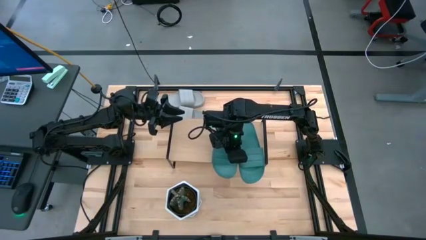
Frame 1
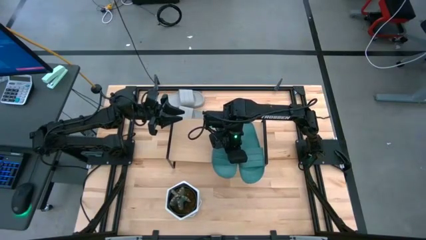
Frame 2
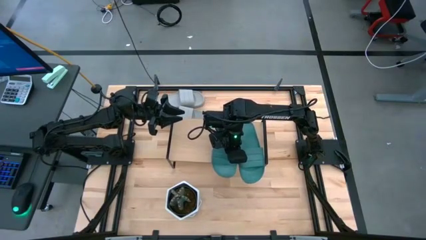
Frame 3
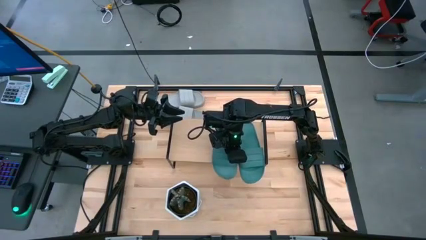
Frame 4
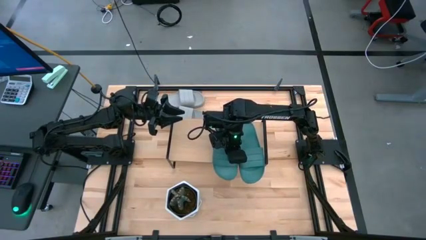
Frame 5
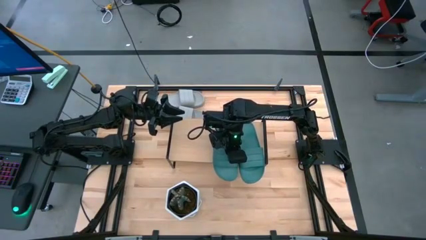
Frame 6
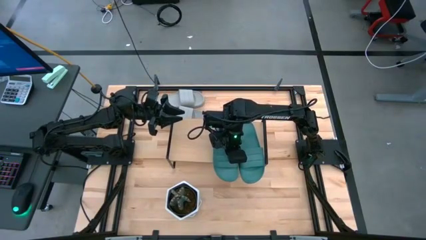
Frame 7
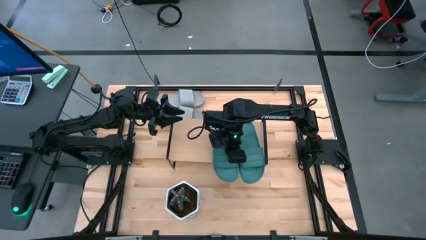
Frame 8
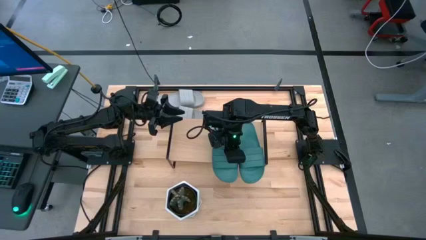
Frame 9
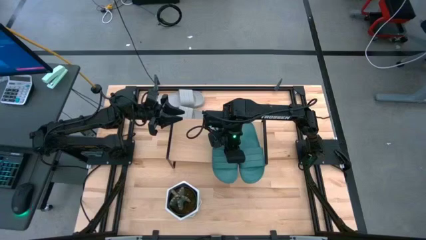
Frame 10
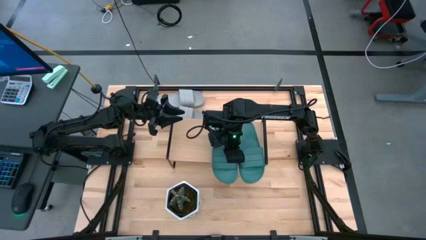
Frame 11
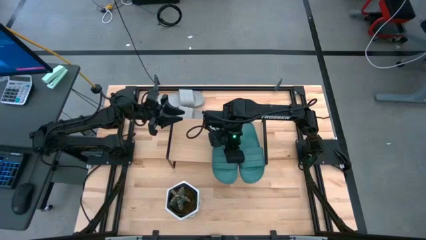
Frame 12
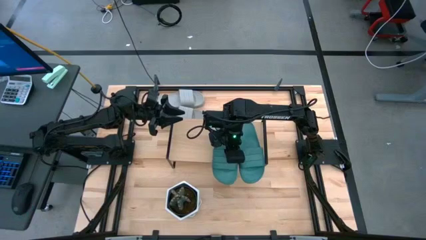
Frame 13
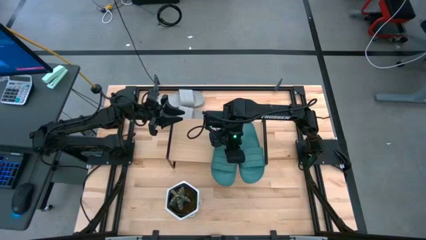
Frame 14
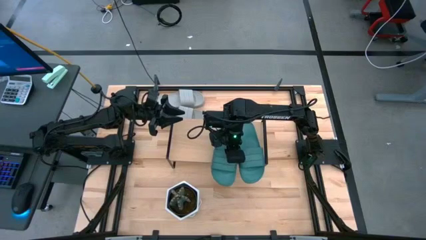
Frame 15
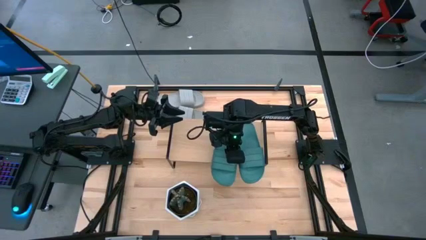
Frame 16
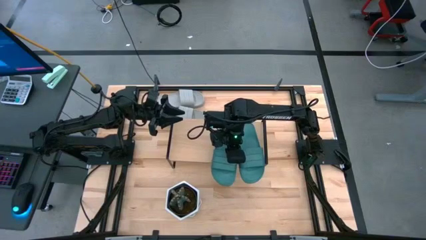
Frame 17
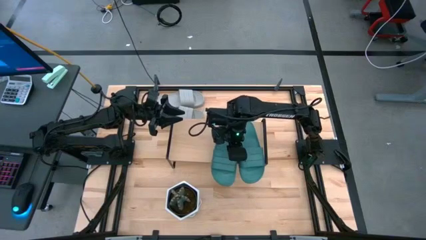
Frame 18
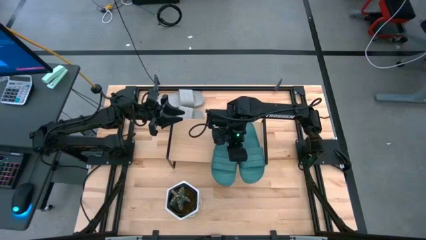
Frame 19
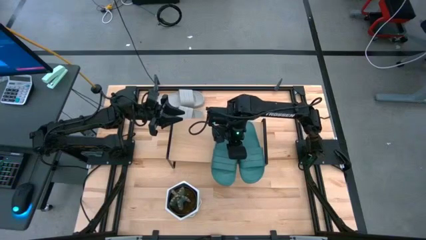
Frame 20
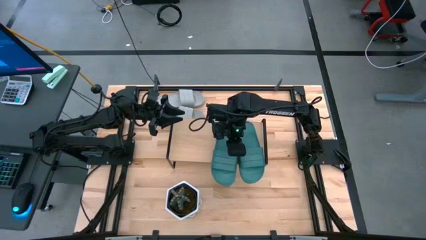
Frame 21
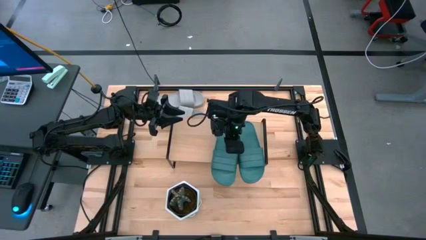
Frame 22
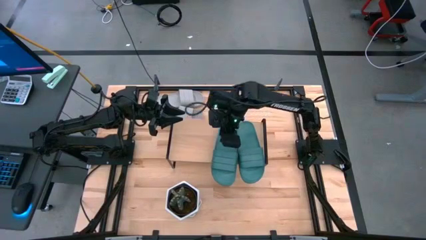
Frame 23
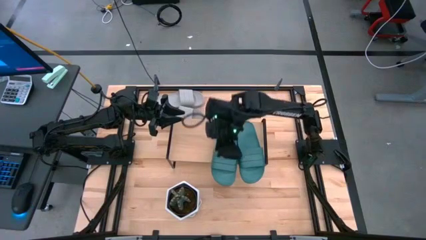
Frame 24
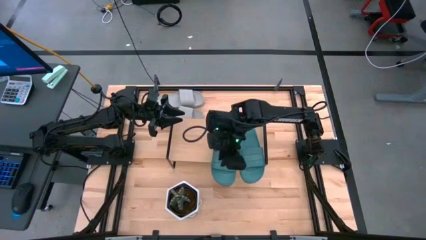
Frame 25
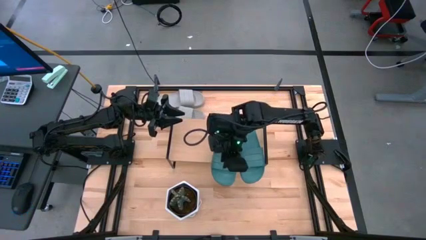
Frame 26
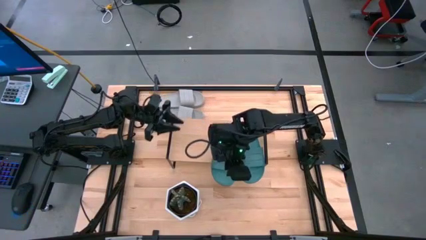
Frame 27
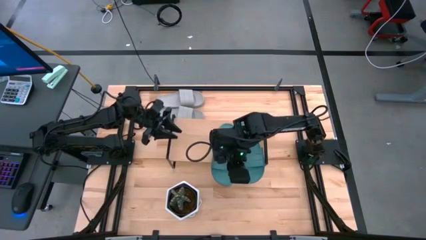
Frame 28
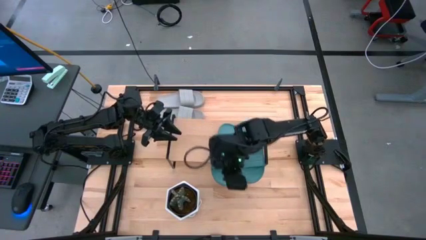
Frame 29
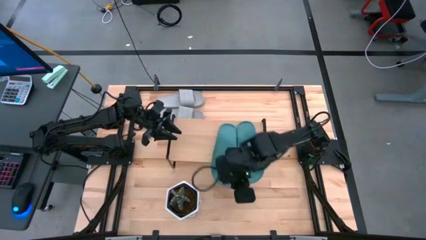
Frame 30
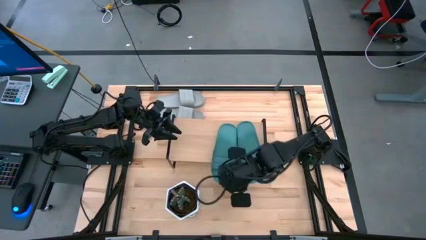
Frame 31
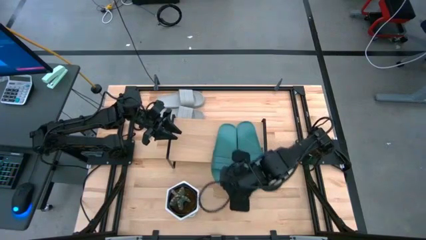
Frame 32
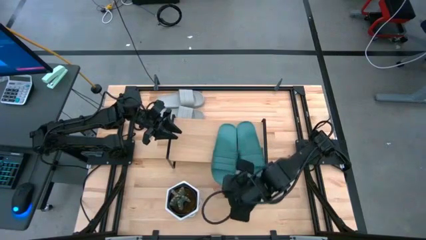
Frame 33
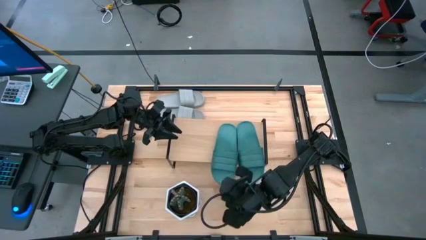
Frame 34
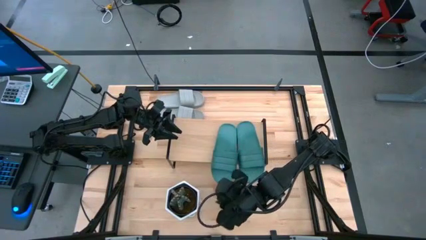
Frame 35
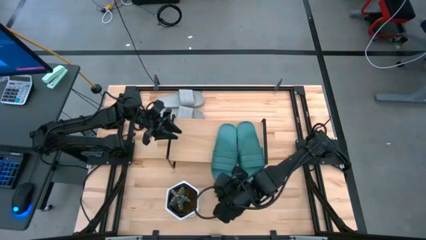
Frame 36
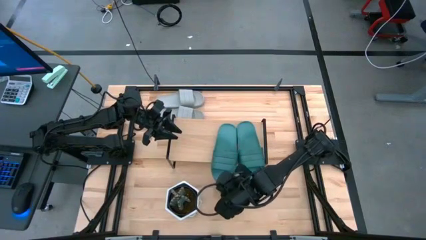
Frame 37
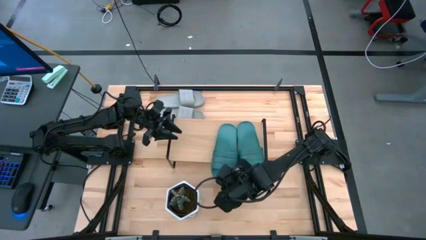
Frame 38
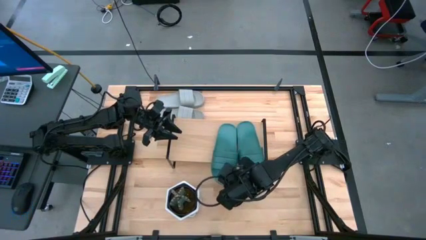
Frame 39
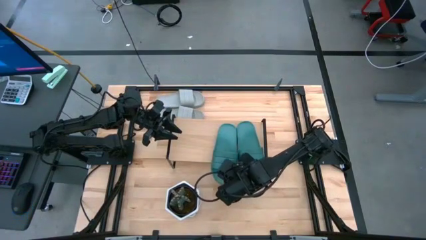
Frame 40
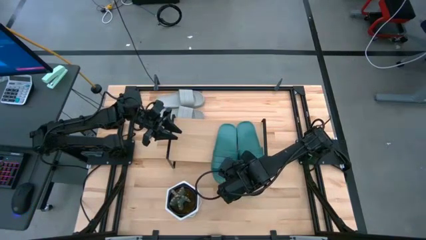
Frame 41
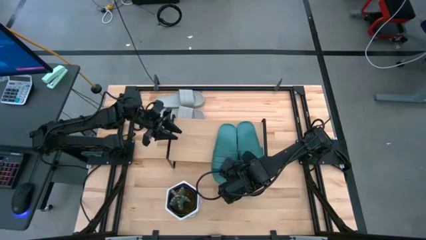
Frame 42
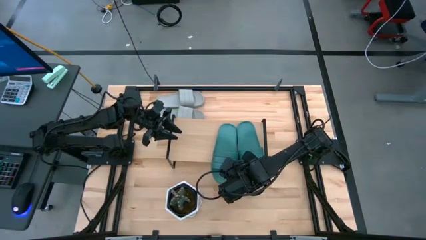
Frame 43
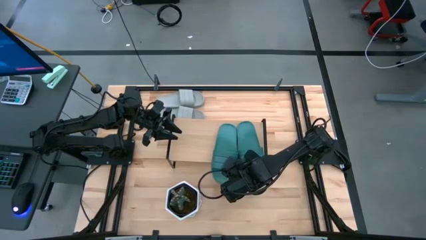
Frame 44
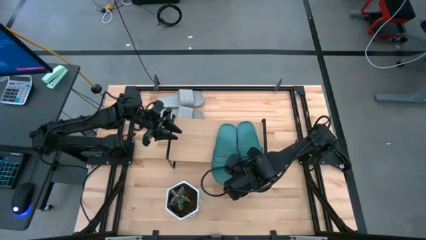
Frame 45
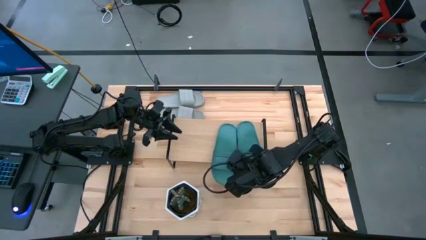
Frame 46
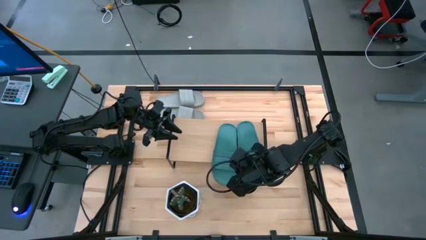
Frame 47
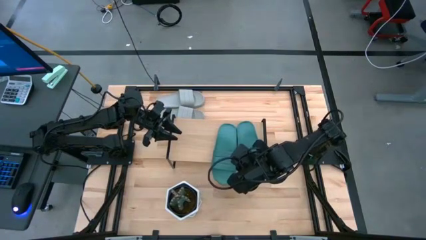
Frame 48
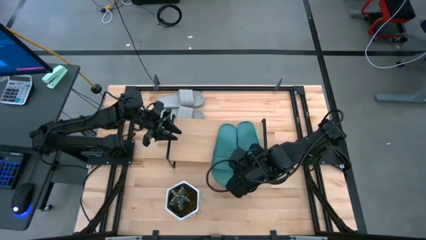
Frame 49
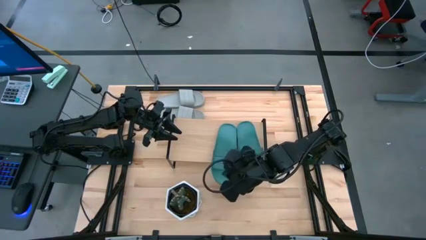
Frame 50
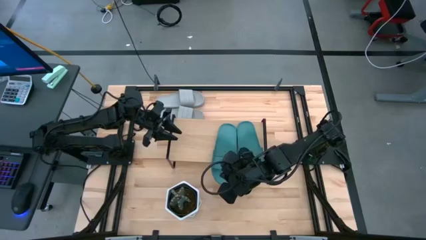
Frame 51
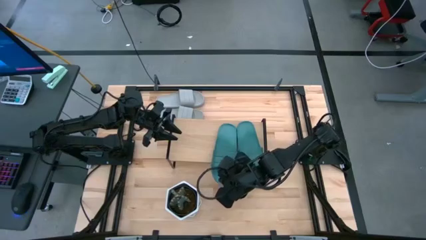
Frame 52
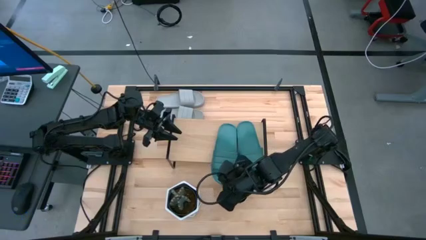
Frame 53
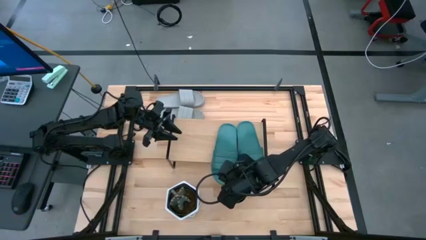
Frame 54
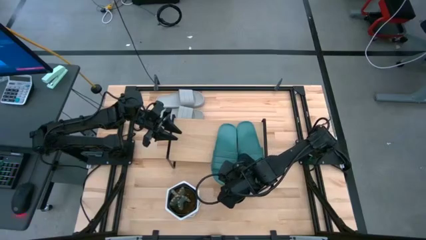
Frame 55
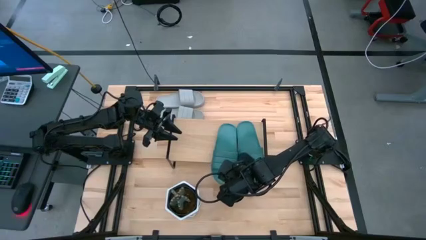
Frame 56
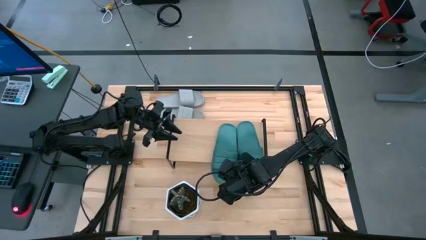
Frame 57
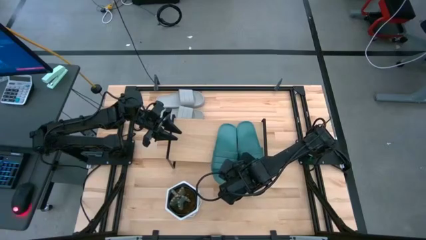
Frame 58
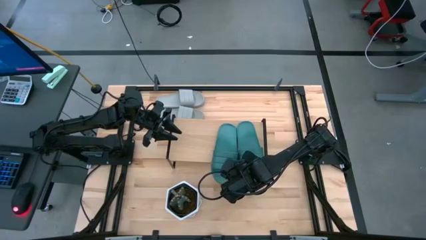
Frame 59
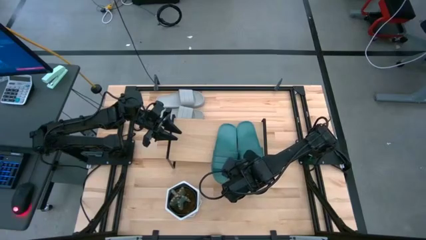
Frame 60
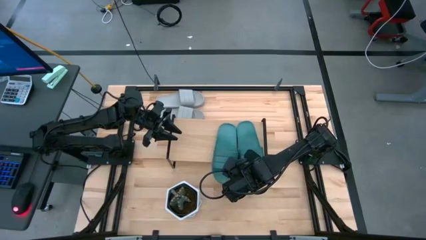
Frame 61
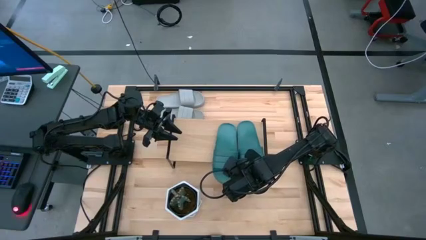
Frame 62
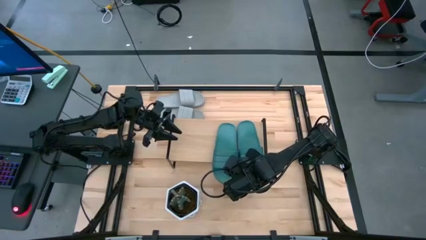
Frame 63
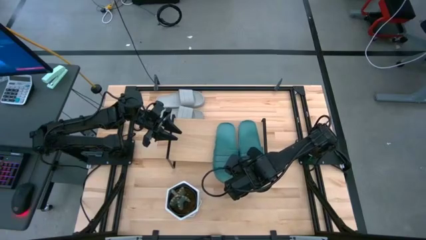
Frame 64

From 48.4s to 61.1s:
Task: Pick and place slides into the shelf
Put the green slide on the shelf

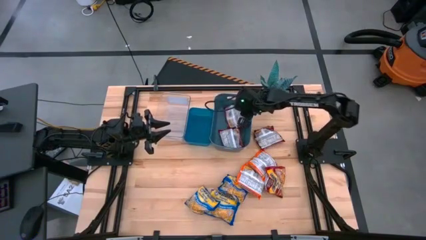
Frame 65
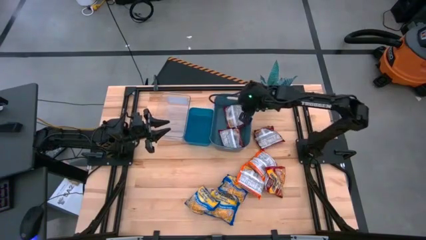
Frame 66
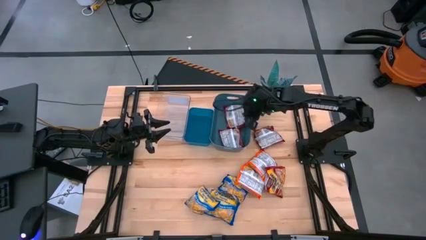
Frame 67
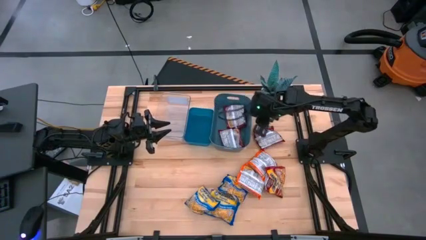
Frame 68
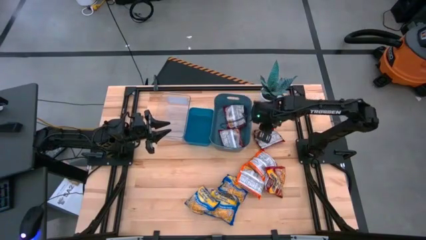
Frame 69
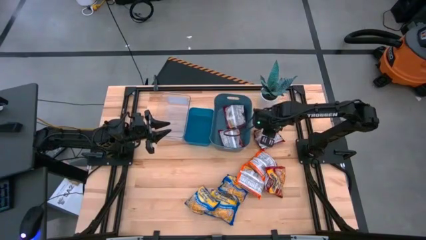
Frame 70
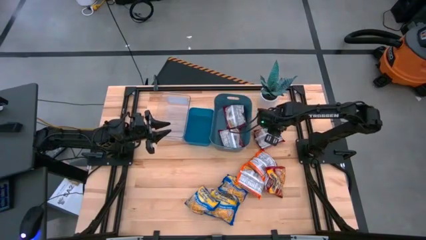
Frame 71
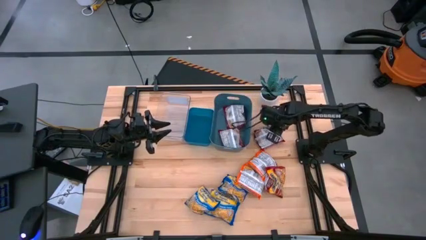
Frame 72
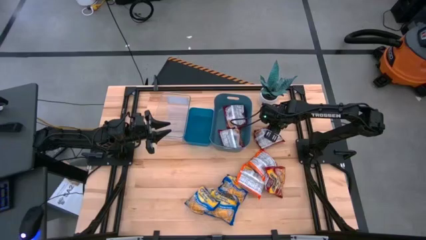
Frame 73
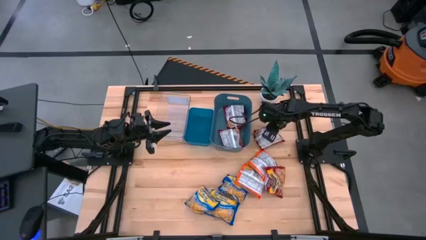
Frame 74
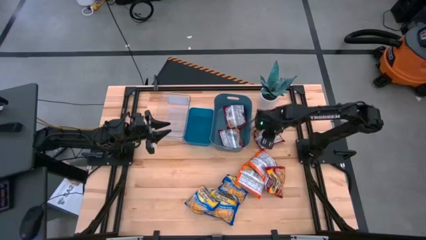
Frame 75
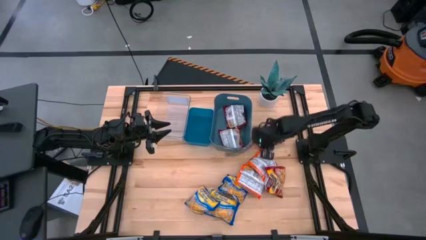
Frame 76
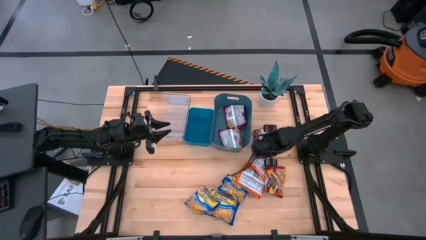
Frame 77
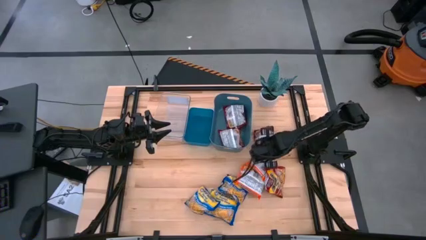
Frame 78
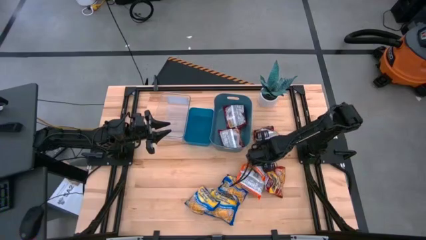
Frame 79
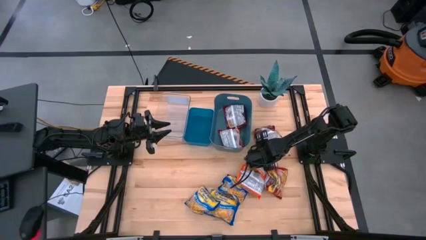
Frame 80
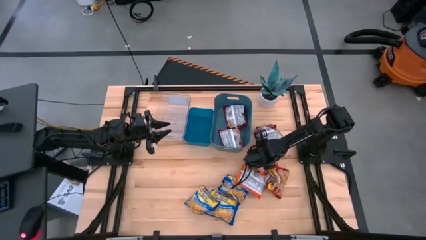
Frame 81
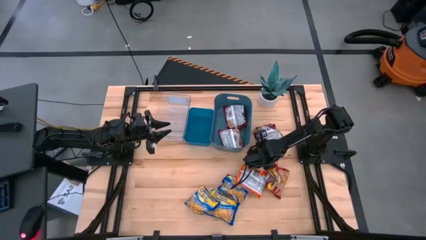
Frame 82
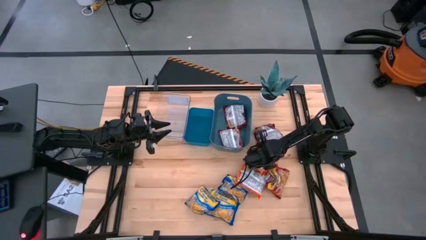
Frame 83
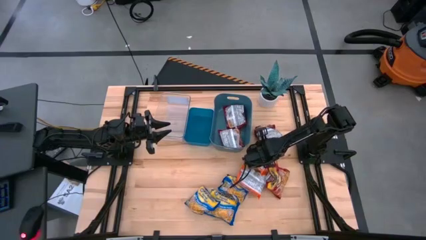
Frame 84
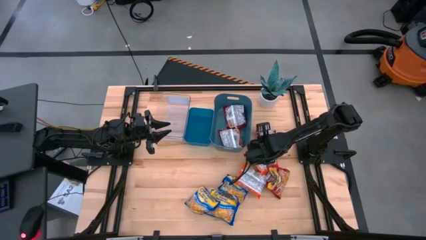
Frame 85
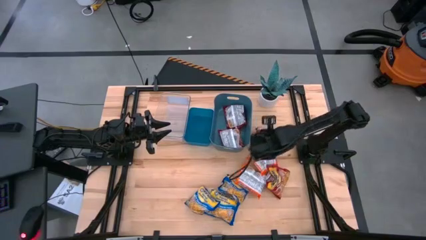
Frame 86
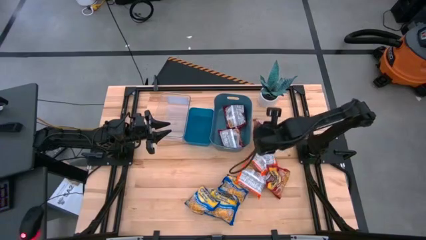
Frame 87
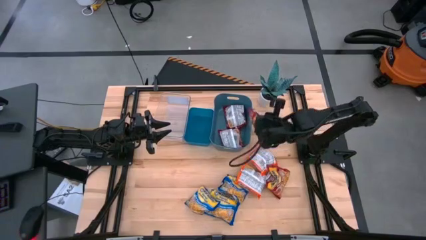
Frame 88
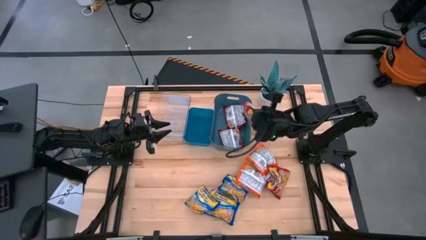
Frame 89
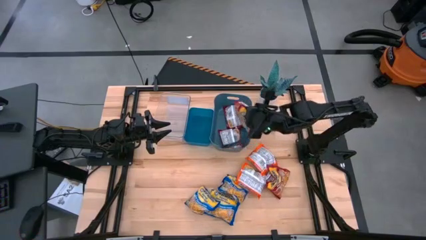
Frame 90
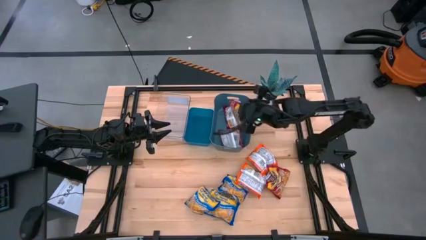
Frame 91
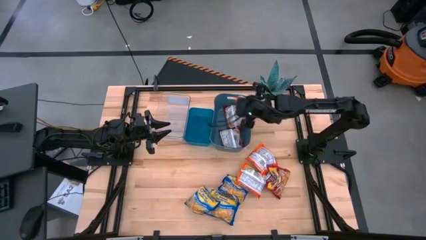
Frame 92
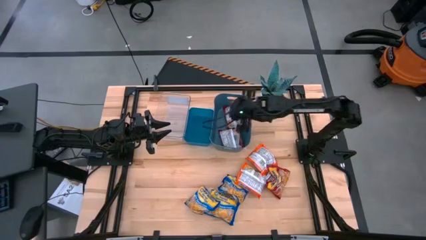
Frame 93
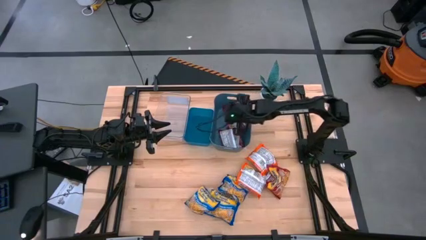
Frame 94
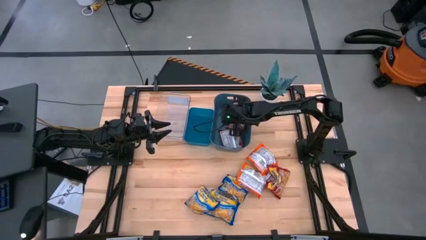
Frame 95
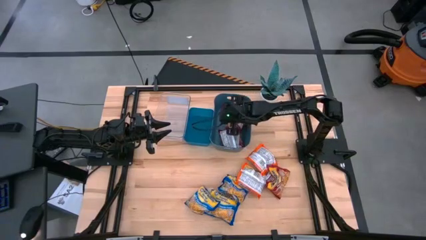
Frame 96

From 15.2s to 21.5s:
Task: Sort Maruchan noodles
Put the red noodle pack into the green bin
